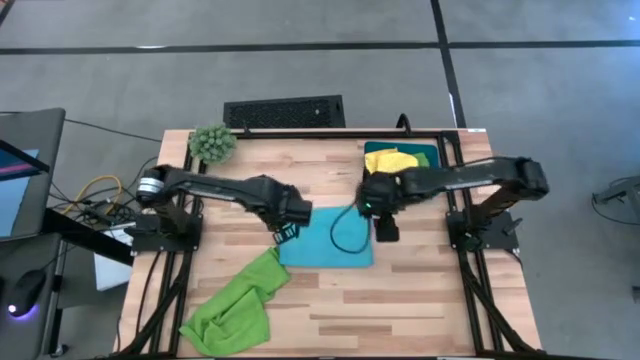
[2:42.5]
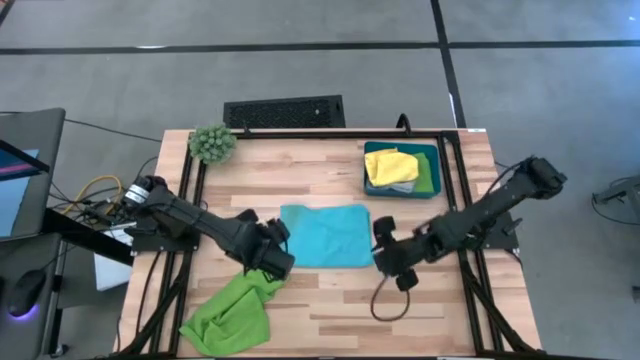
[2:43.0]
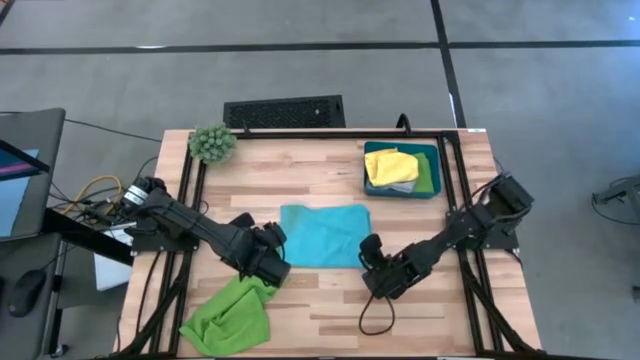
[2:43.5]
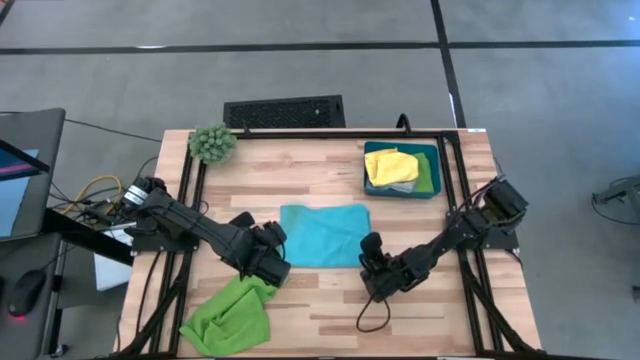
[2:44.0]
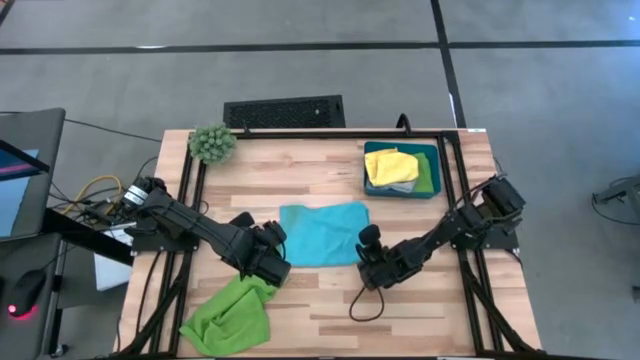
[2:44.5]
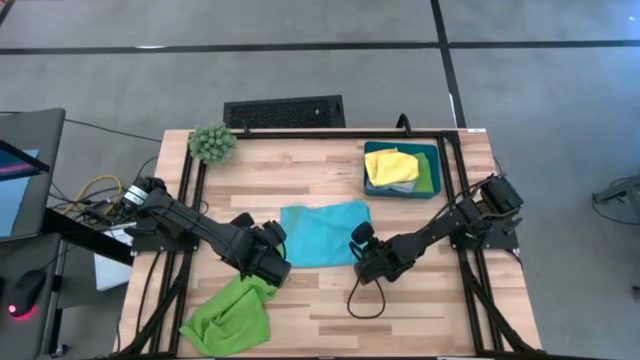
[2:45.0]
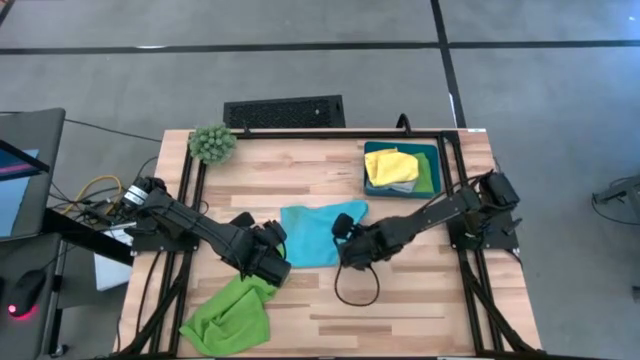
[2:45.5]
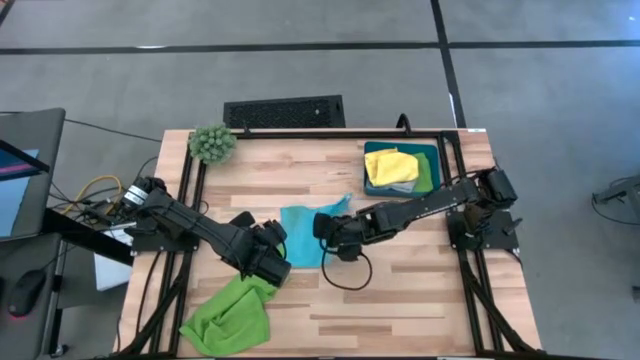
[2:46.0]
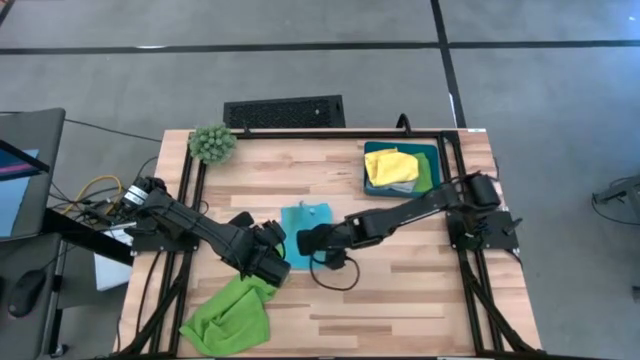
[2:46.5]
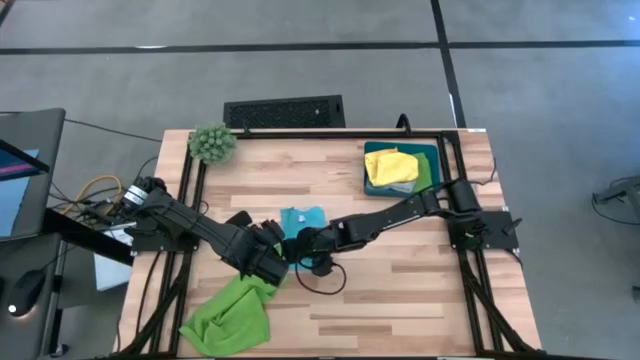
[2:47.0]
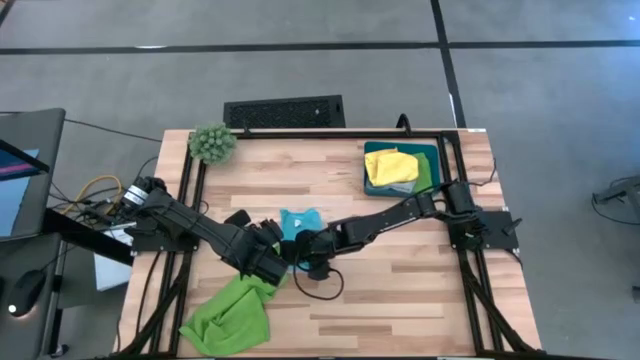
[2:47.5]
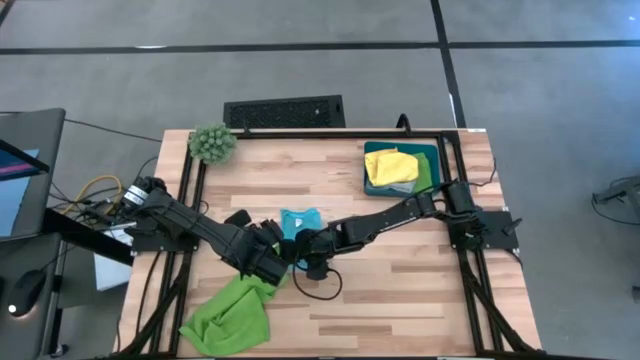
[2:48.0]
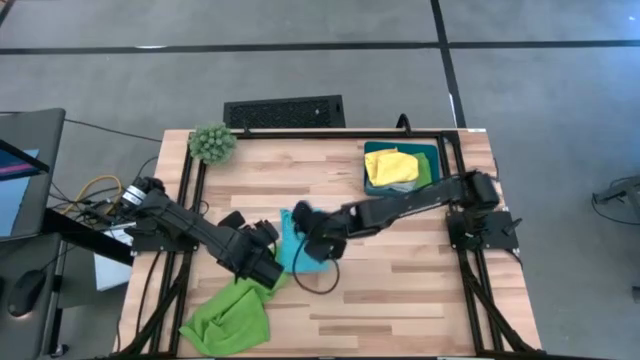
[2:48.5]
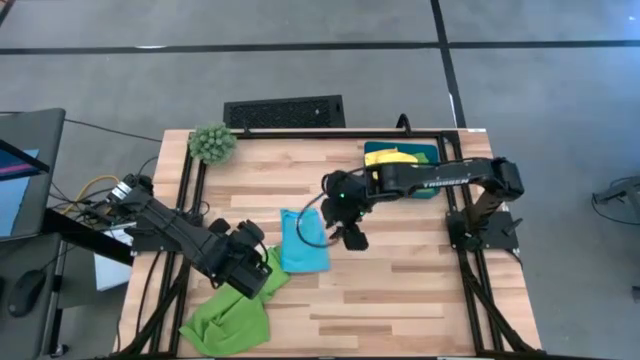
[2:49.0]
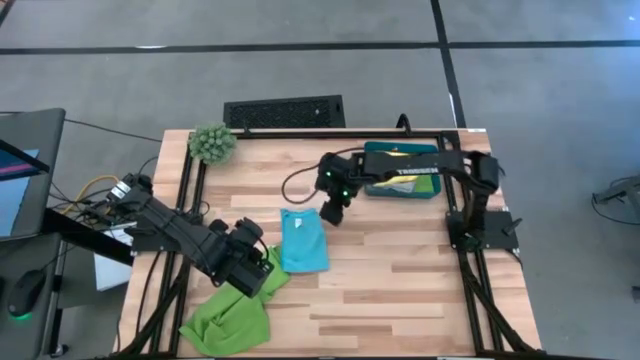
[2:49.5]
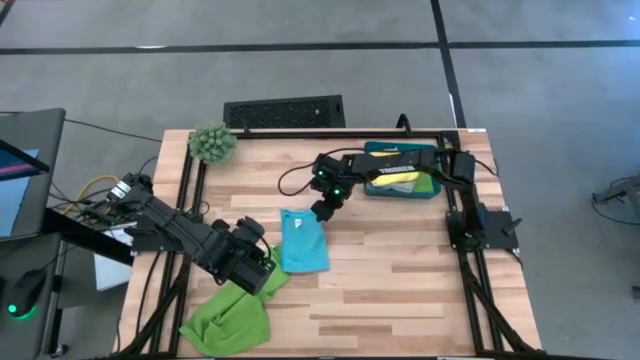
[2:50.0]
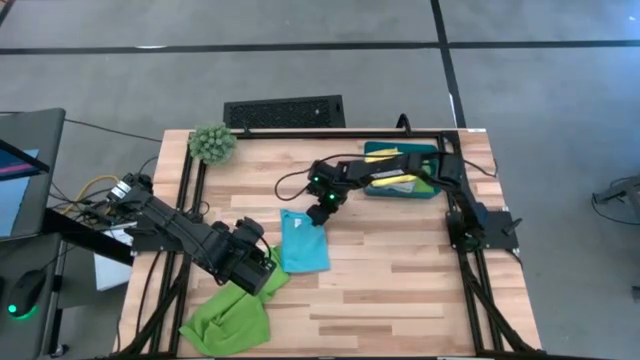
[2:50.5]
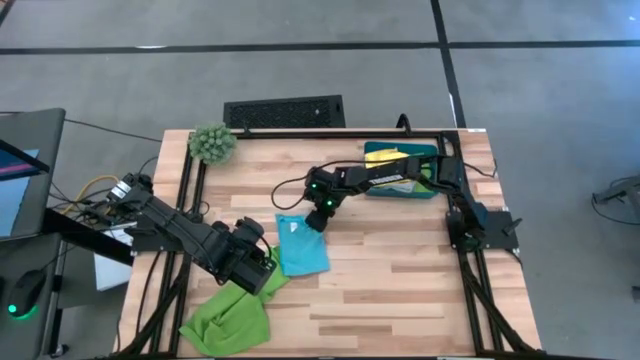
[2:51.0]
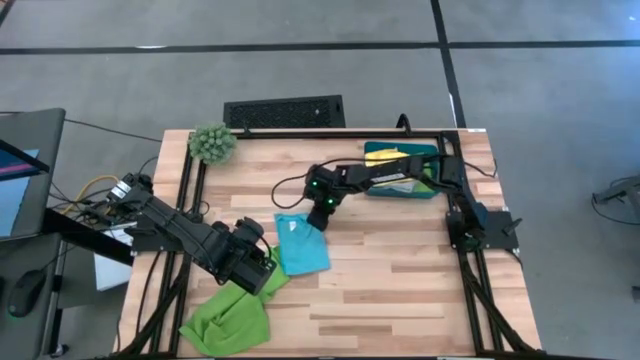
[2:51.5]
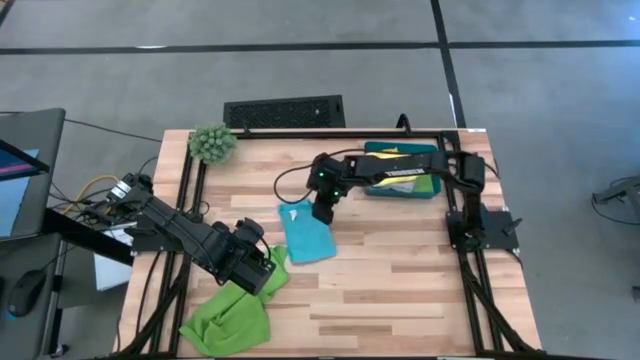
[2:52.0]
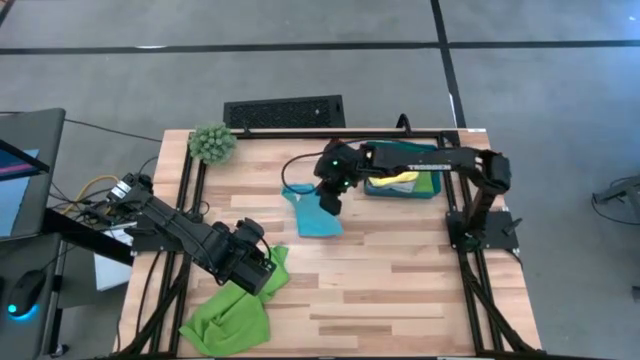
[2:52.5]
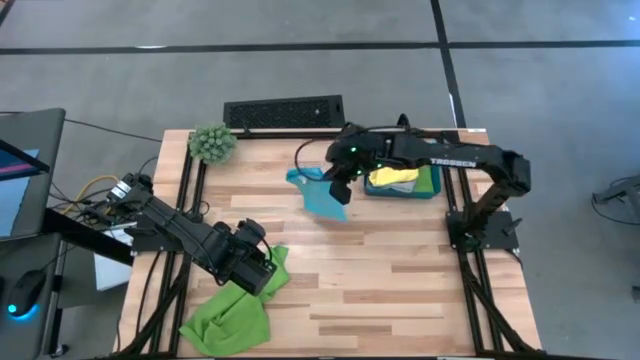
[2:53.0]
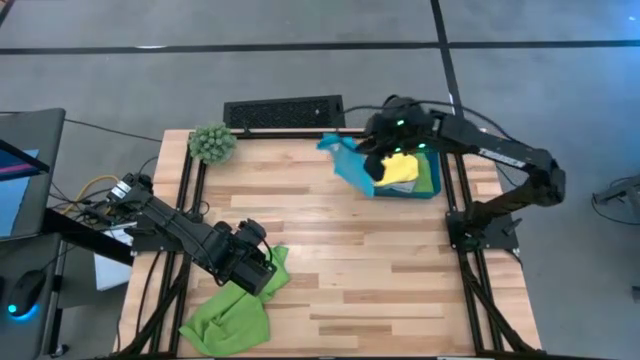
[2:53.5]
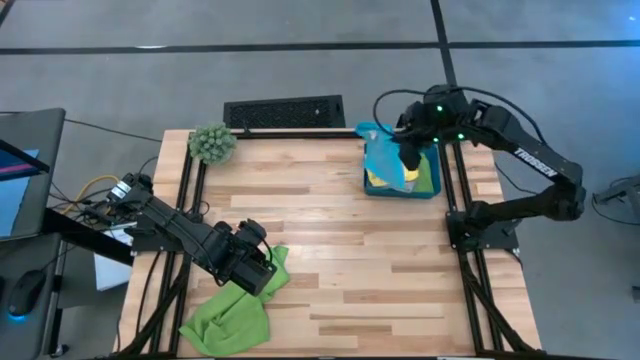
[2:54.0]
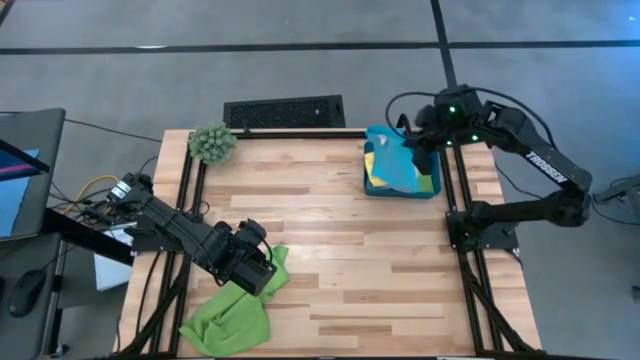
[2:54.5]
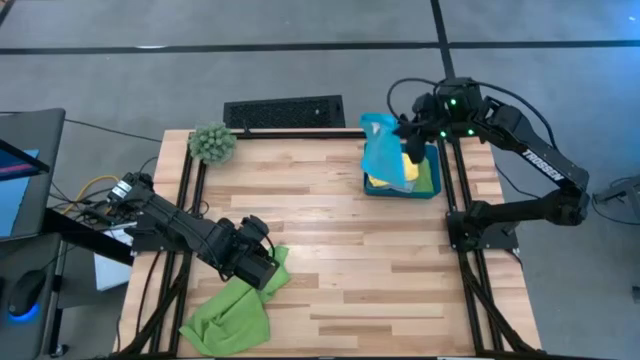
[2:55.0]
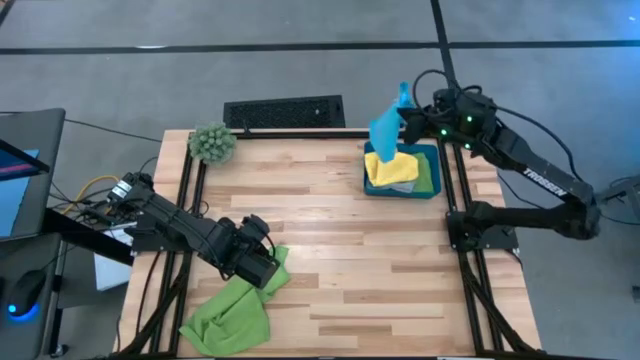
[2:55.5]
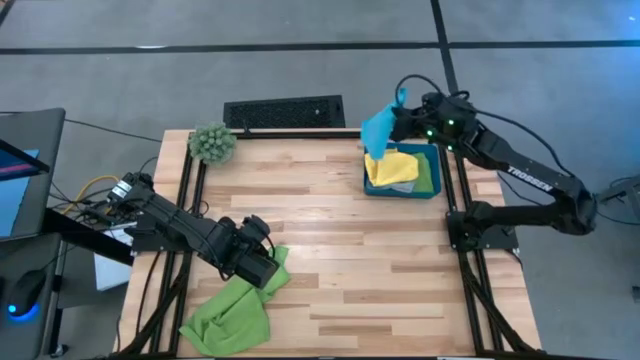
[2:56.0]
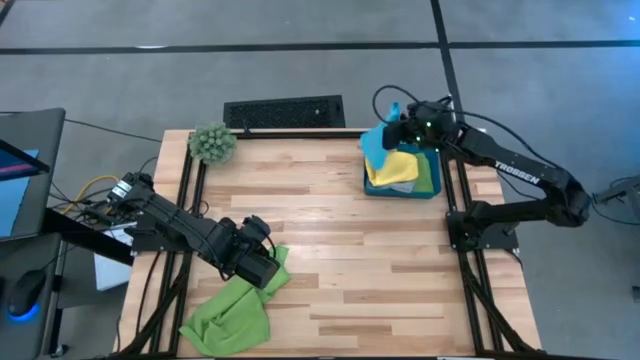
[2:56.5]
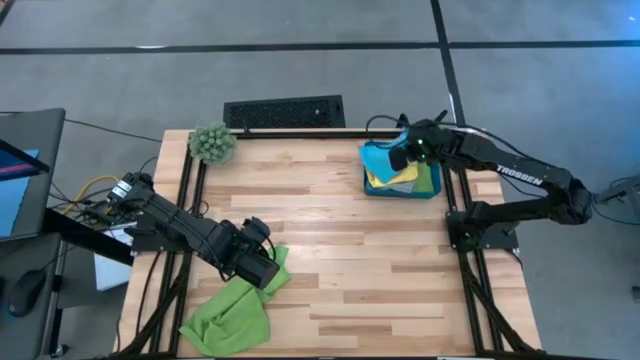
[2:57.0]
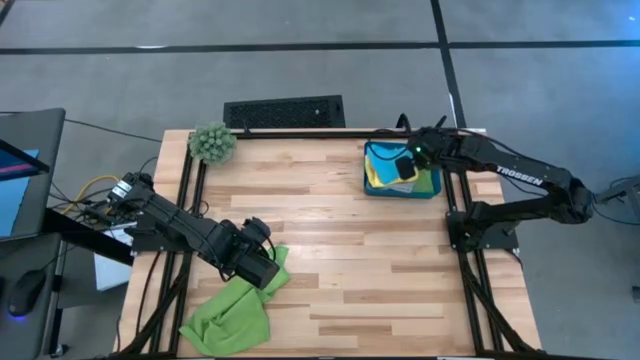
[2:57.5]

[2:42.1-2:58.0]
Task: Fold microfiber towels
Fold the light blue microfiber cloth

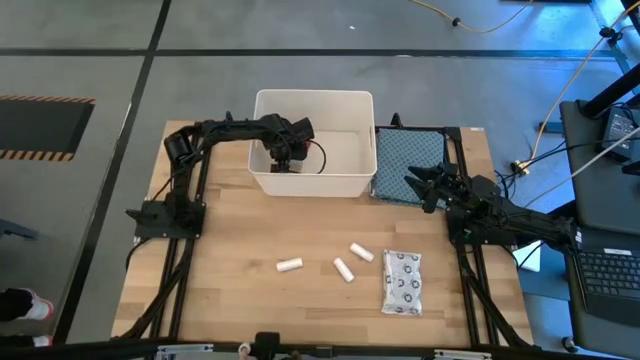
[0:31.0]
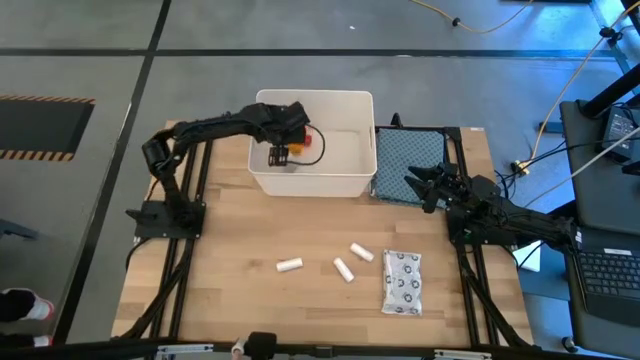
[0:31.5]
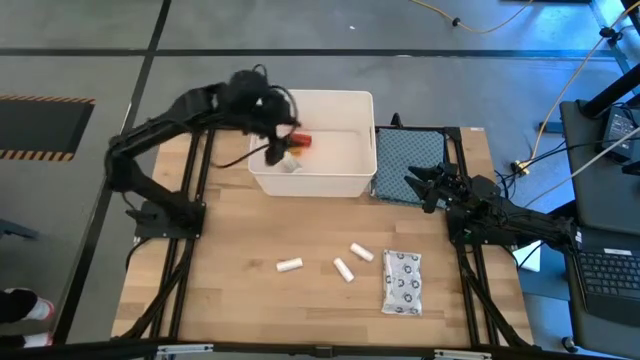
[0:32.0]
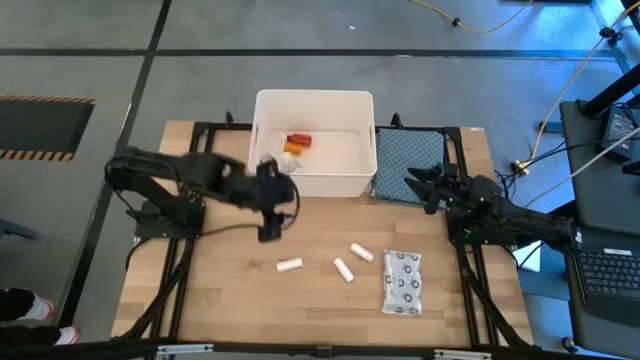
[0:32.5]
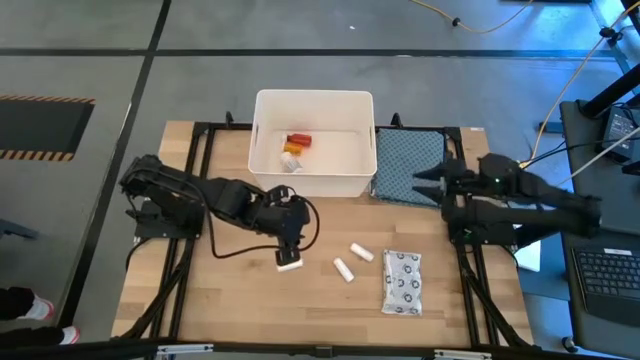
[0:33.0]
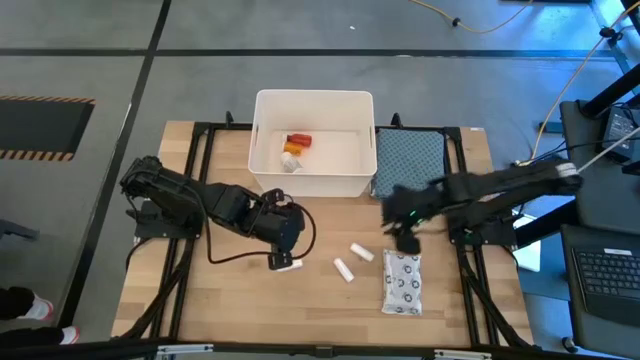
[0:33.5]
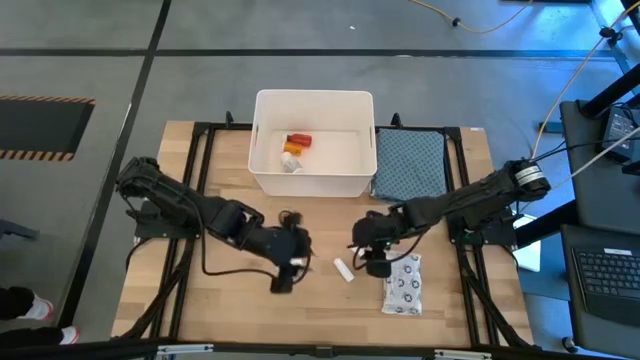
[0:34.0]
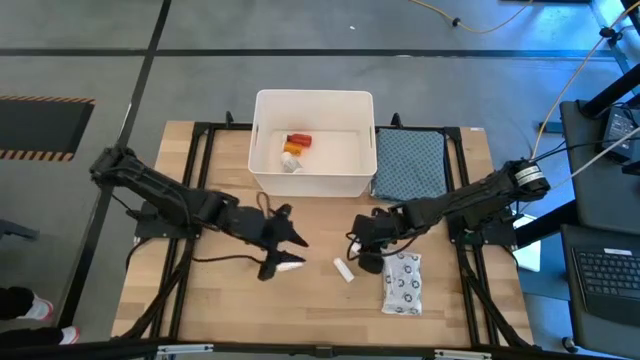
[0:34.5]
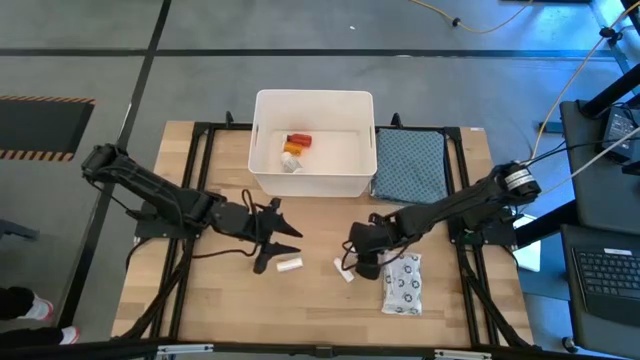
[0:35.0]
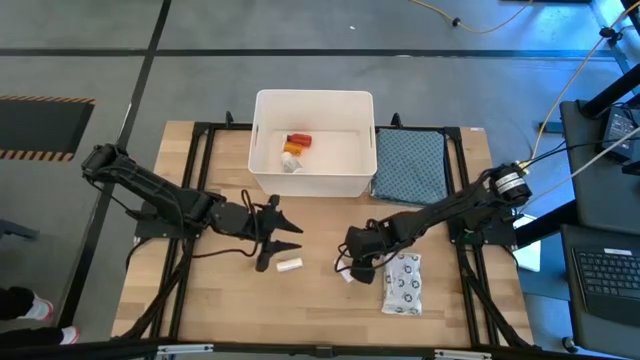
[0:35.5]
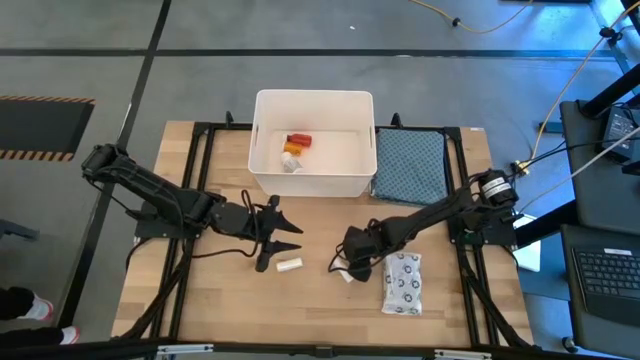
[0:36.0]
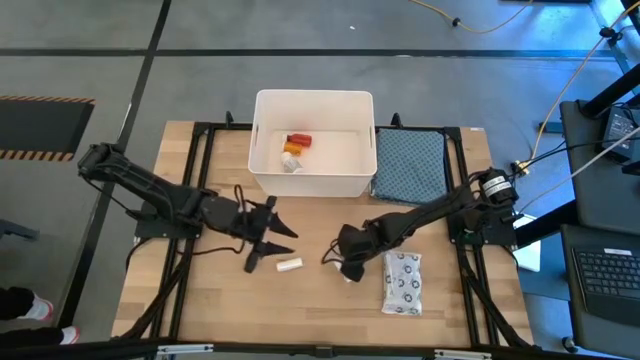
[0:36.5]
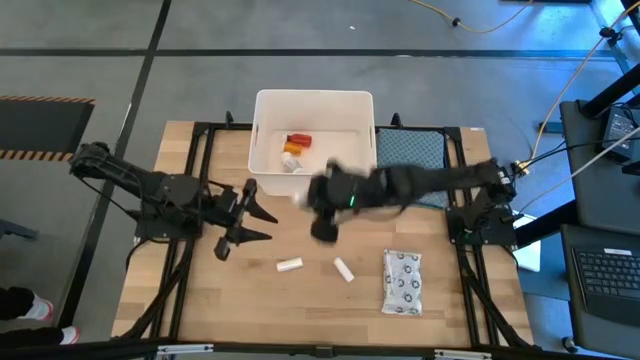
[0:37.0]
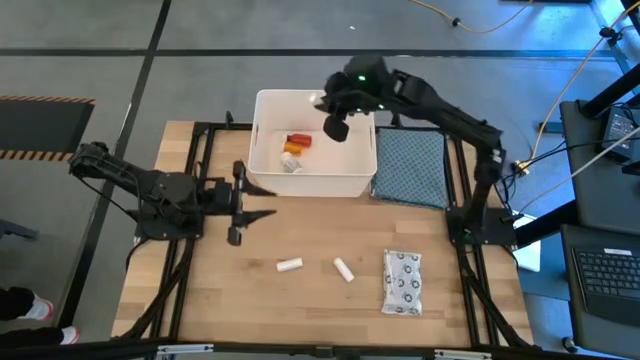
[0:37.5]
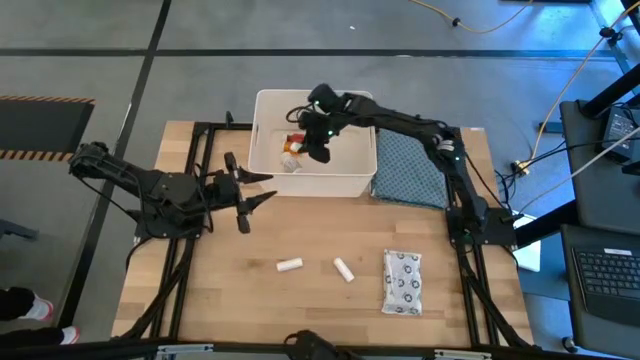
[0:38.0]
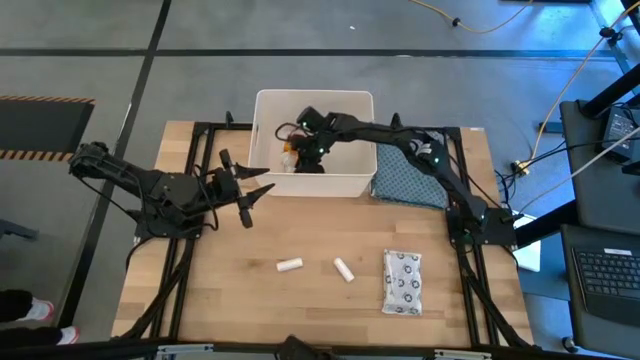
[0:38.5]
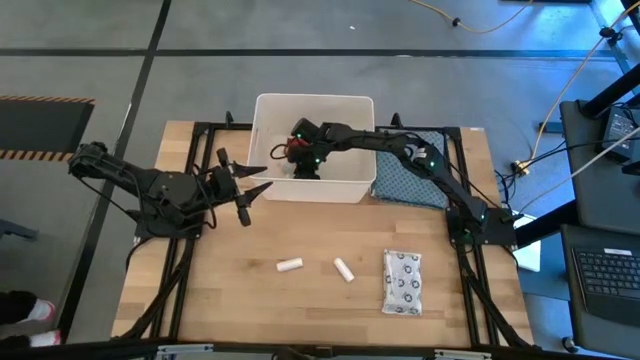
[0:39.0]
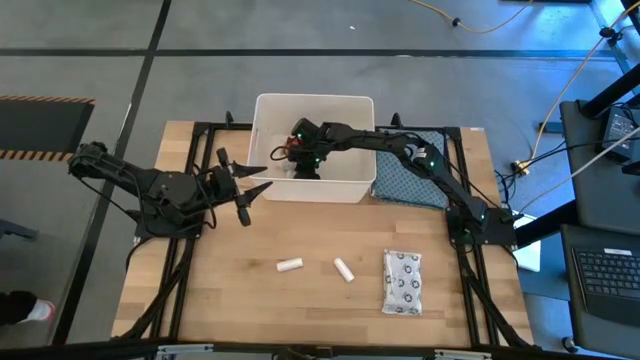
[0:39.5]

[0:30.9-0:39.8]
Task: Pick & place medical supplies in basket/bin
Put the top right rolled white gauze into the white bin
